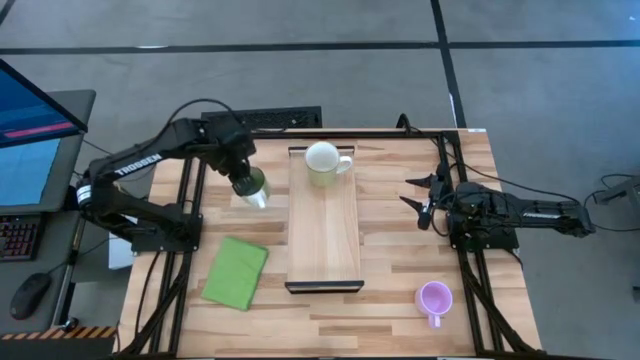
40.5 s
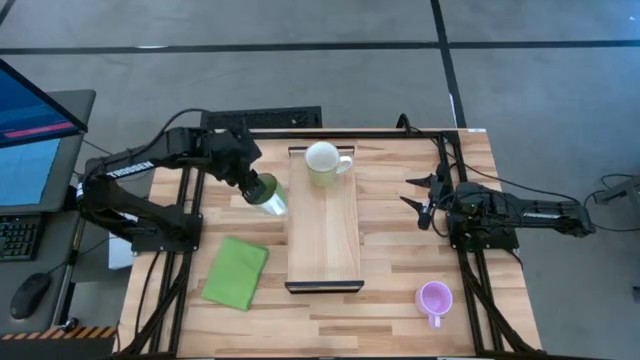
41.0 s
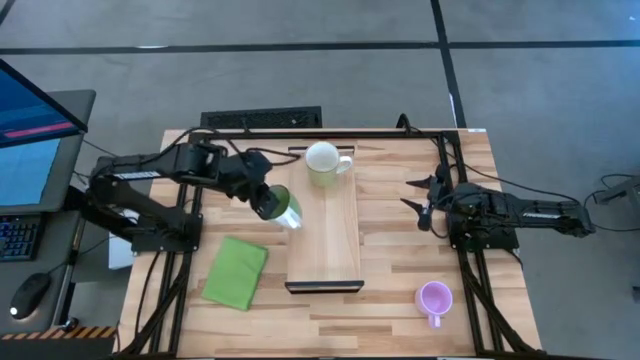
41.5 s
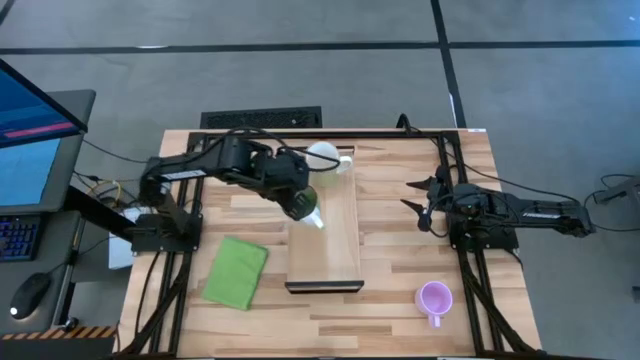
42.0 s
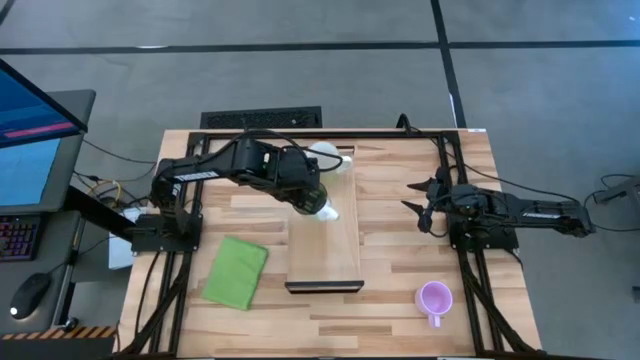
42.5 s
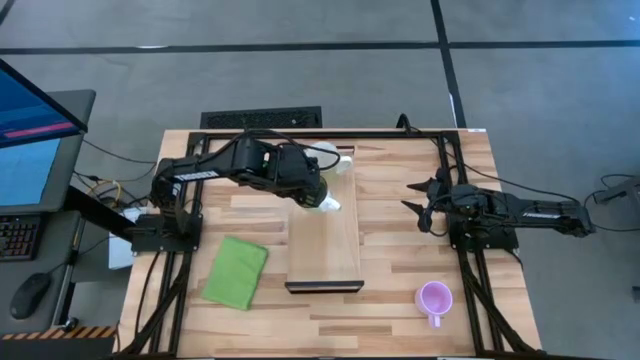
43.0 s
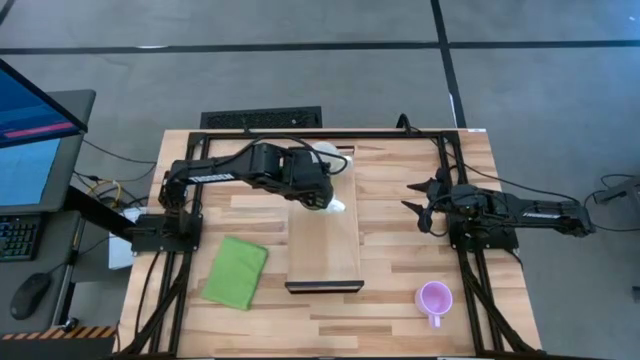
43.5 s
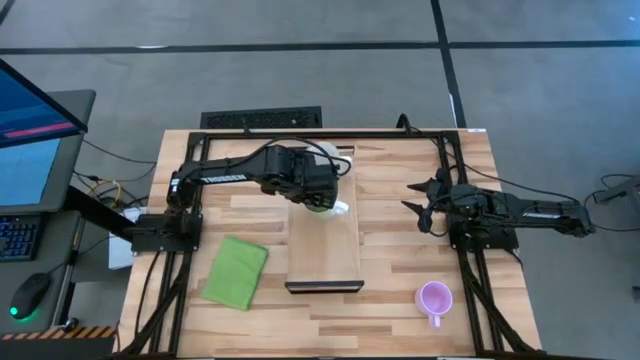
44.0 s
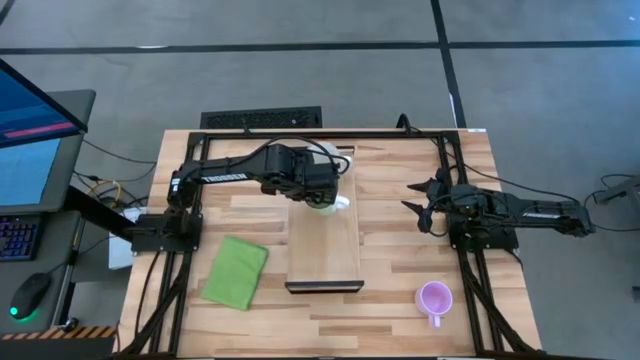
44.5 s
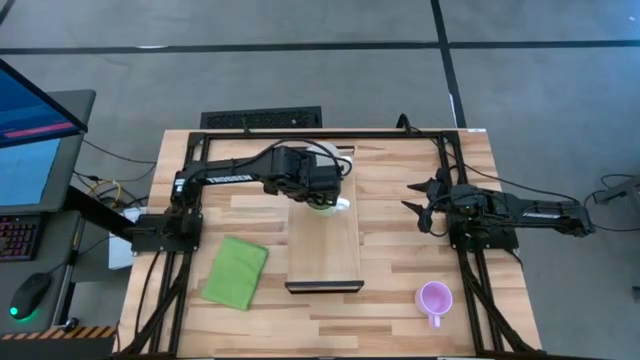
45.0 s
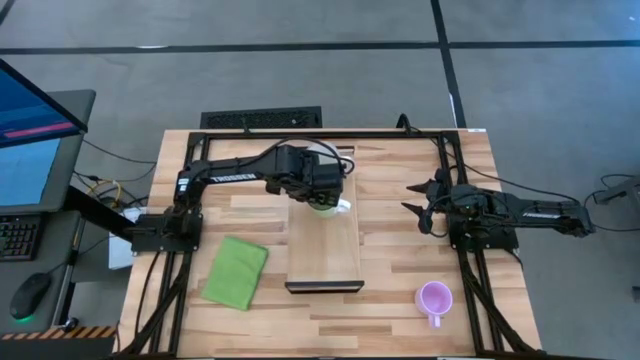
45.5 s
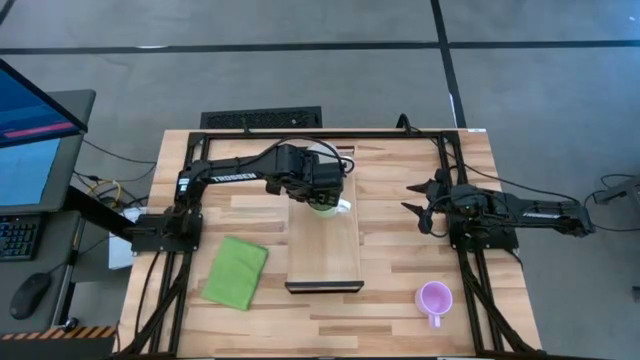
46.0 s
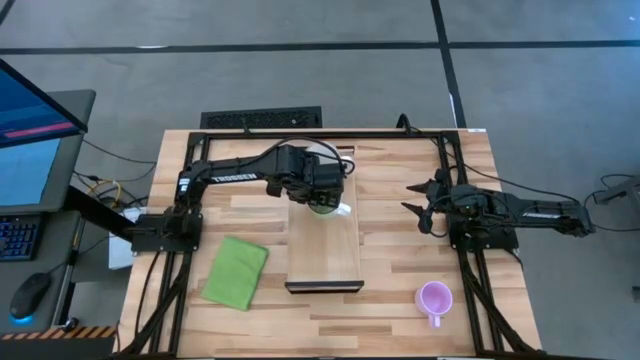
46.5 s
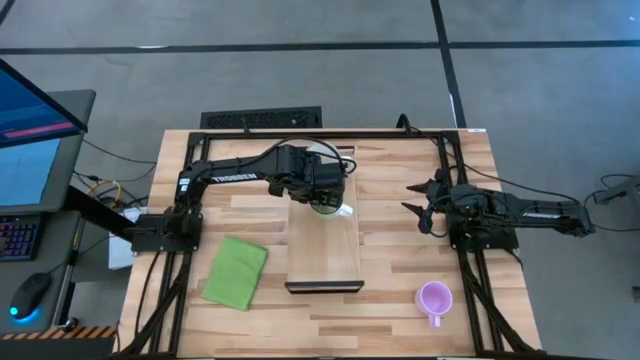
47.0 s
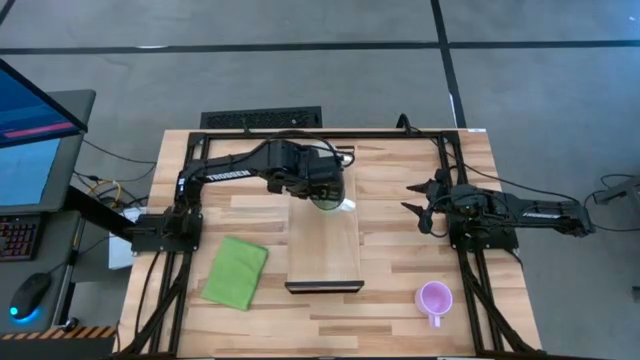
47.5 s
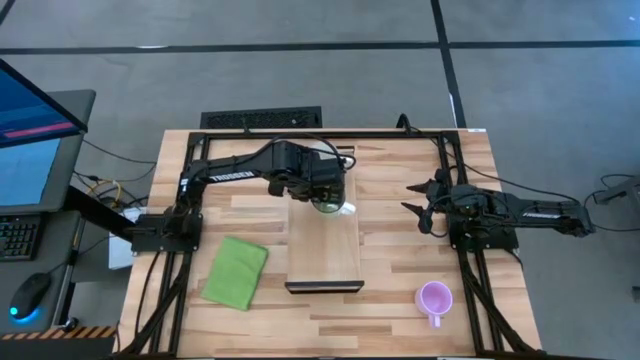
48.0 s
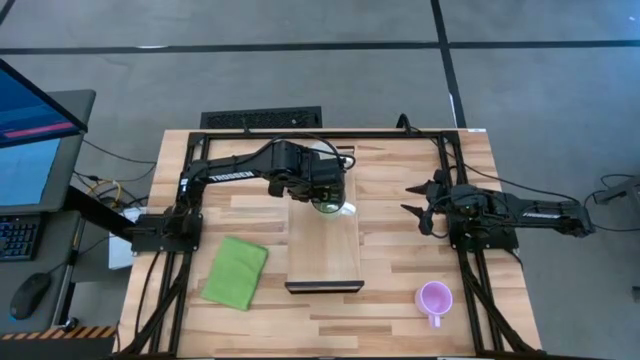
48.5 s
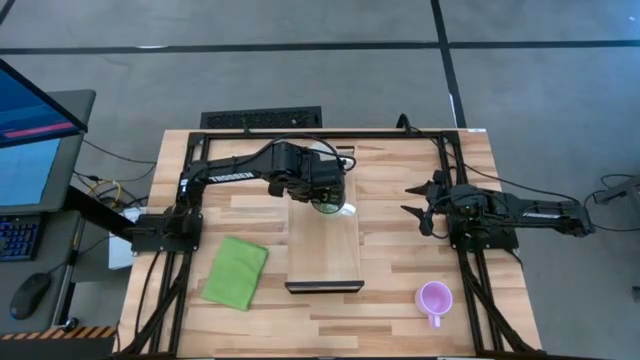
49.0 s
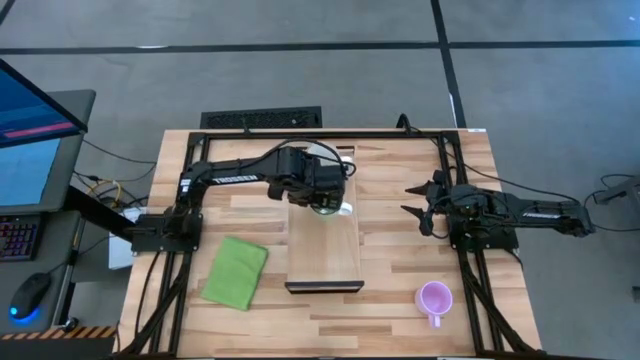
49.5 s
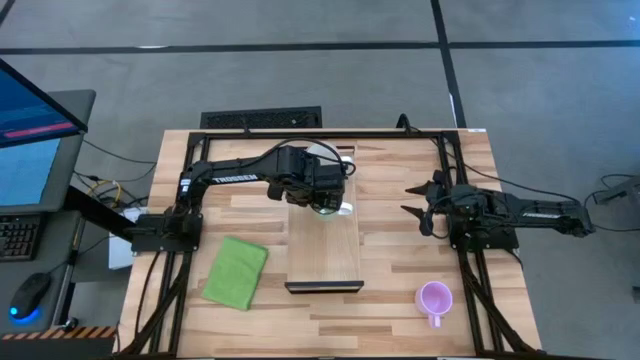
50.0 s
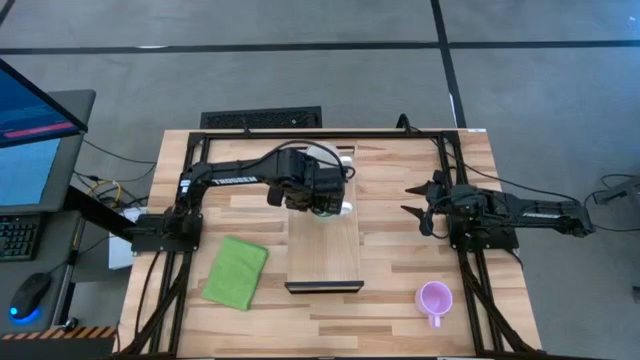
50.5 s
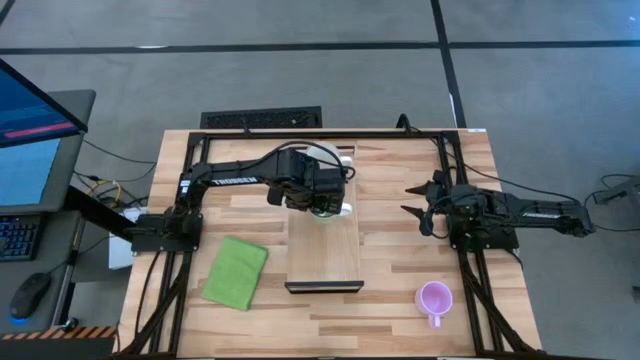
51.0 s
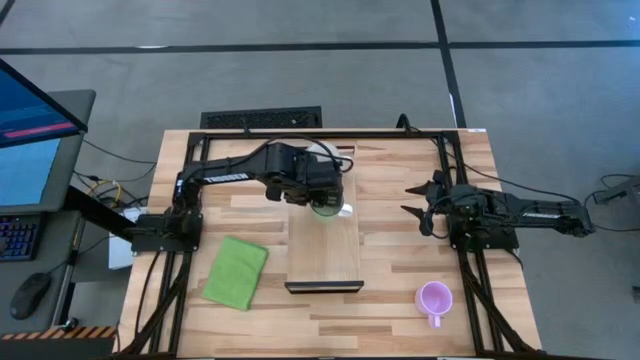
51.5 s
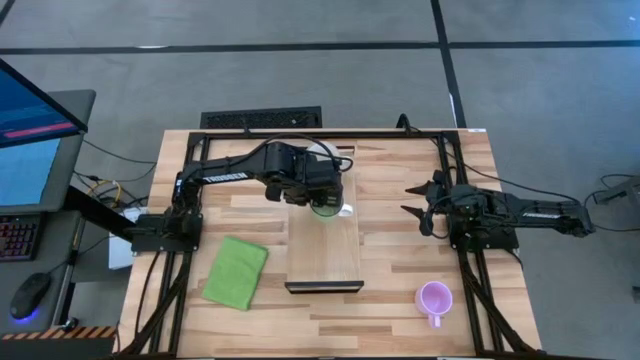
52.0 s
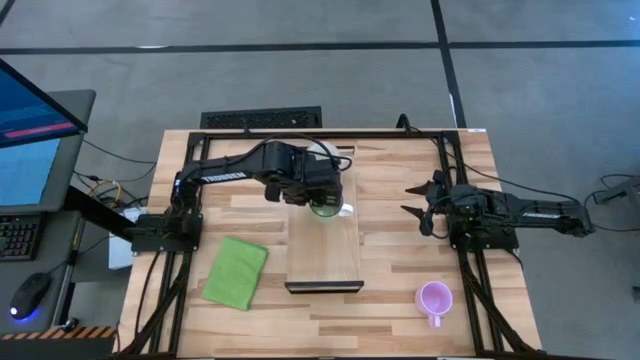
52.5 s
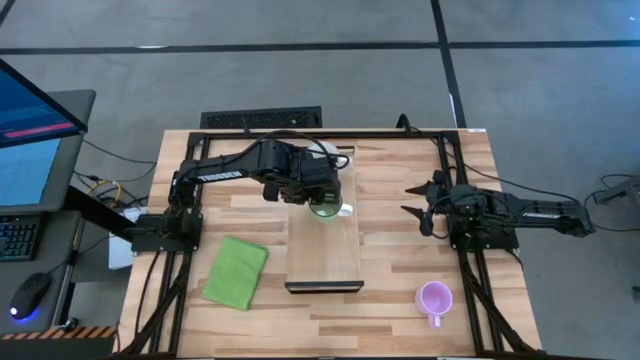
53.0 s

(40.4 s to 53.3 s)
Task: Stack small to large cups/mugs on shelf
Put the green mug on the shelf
